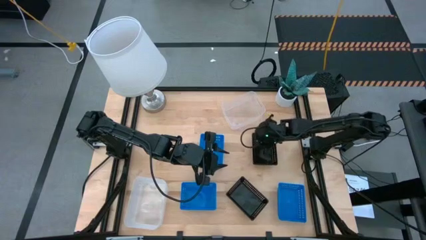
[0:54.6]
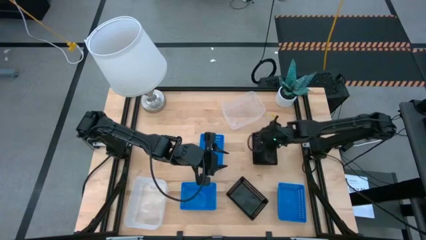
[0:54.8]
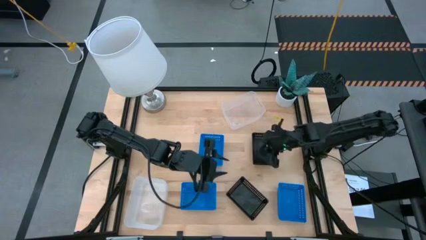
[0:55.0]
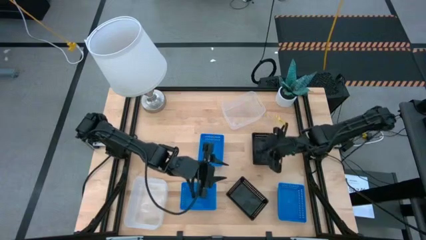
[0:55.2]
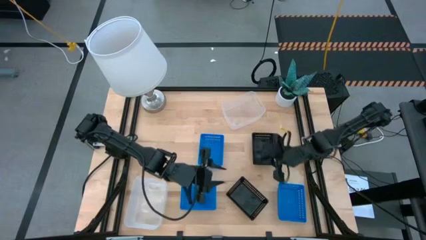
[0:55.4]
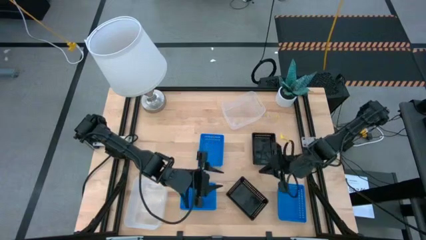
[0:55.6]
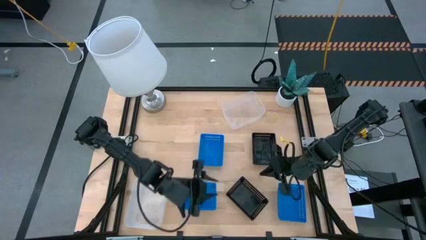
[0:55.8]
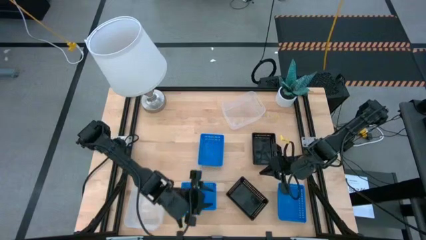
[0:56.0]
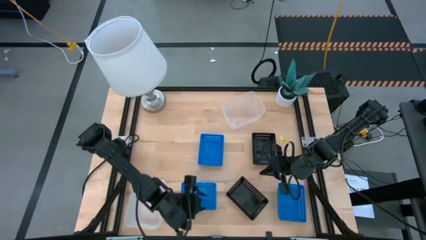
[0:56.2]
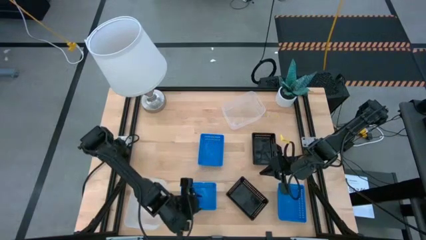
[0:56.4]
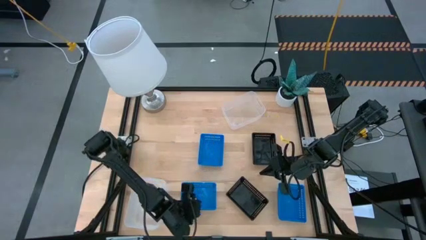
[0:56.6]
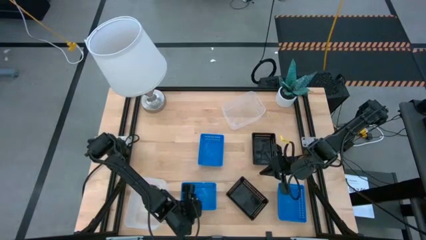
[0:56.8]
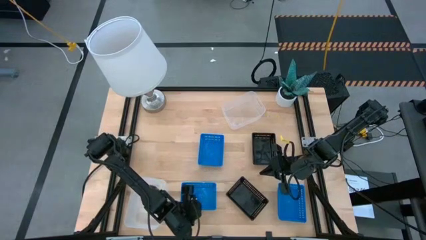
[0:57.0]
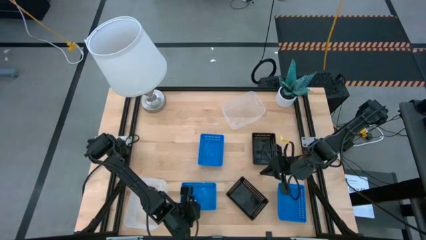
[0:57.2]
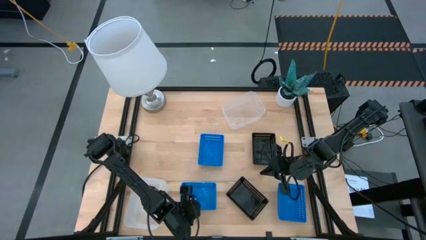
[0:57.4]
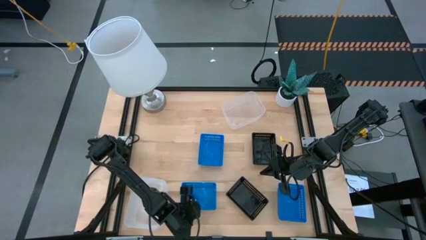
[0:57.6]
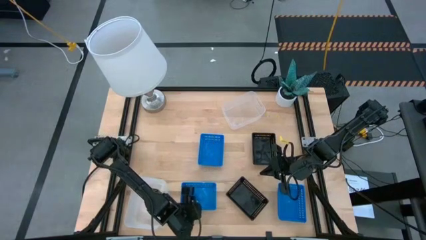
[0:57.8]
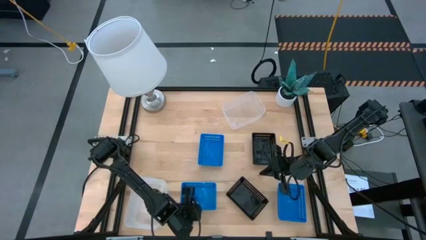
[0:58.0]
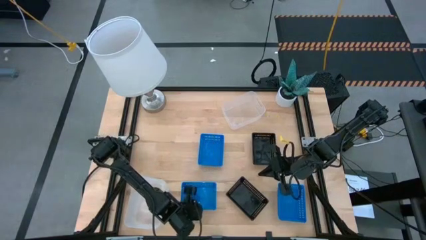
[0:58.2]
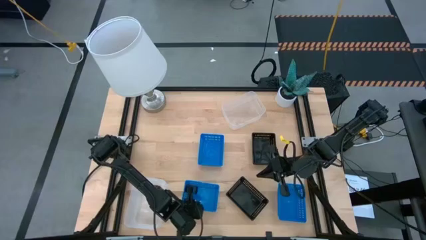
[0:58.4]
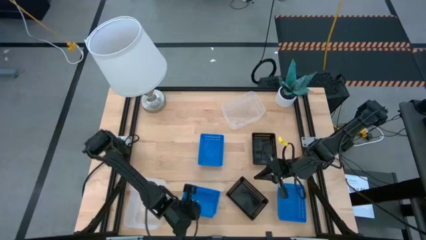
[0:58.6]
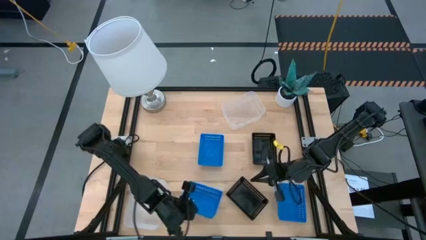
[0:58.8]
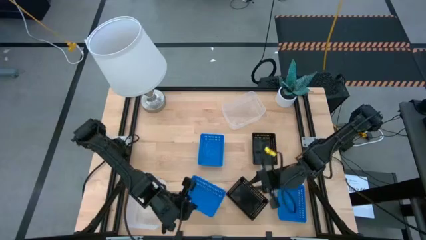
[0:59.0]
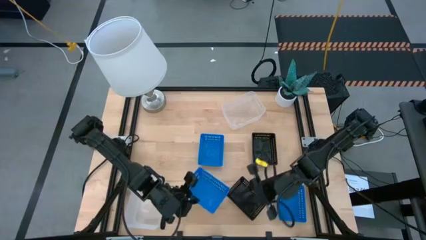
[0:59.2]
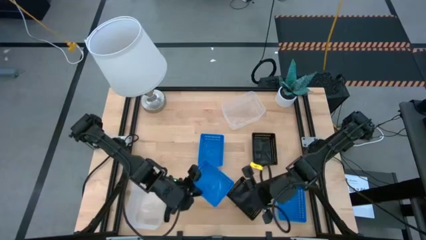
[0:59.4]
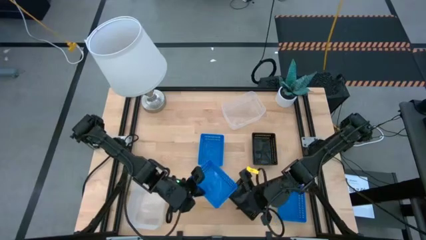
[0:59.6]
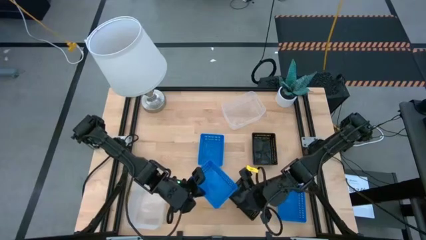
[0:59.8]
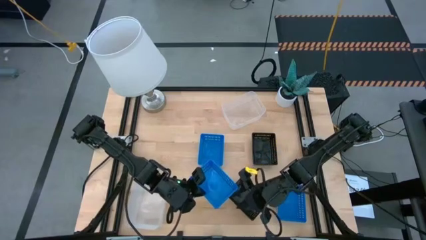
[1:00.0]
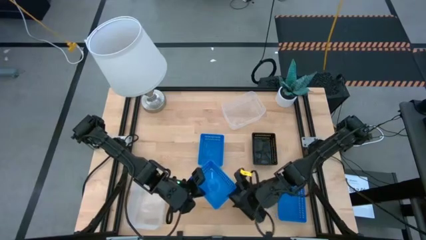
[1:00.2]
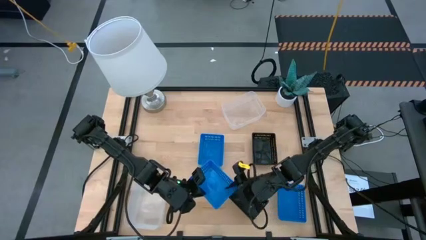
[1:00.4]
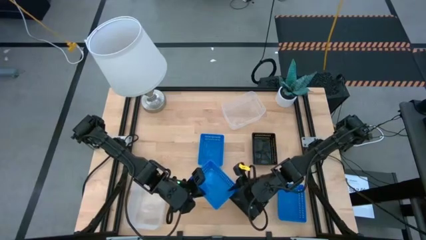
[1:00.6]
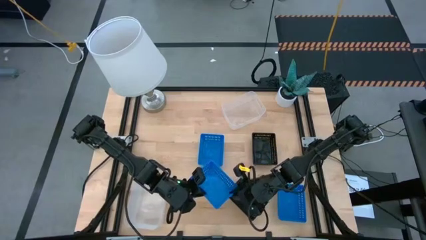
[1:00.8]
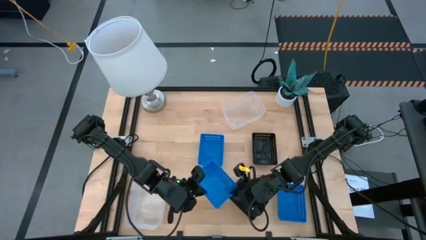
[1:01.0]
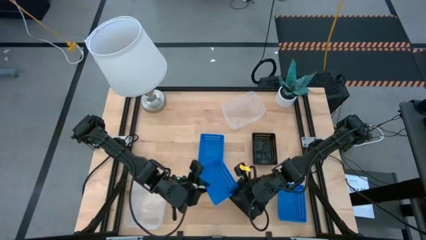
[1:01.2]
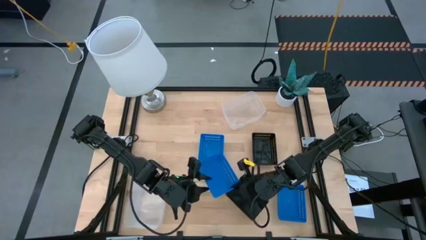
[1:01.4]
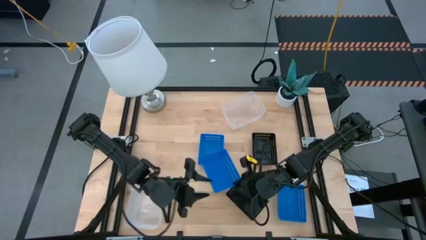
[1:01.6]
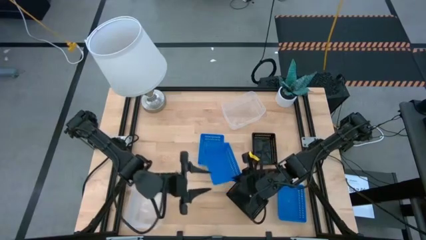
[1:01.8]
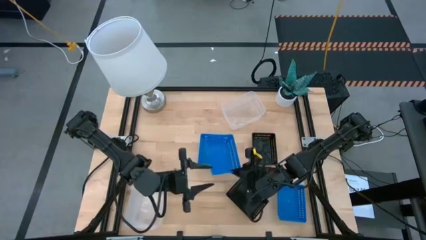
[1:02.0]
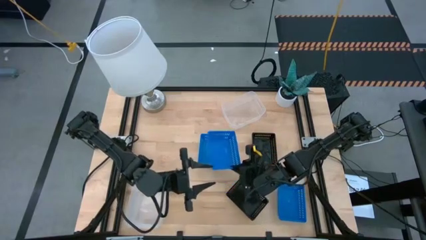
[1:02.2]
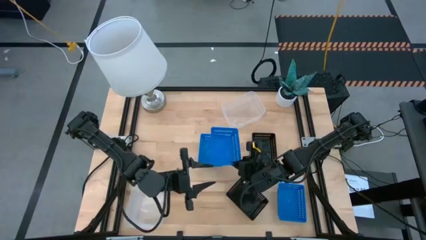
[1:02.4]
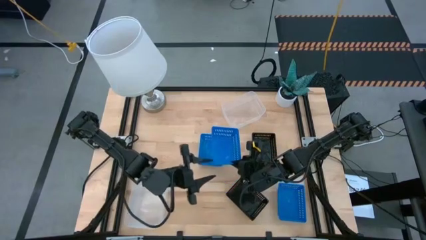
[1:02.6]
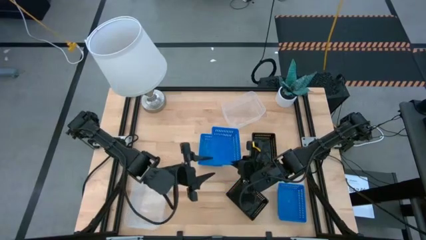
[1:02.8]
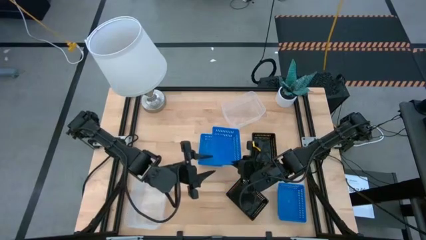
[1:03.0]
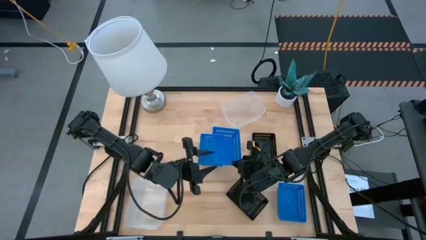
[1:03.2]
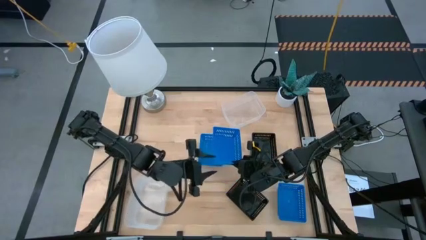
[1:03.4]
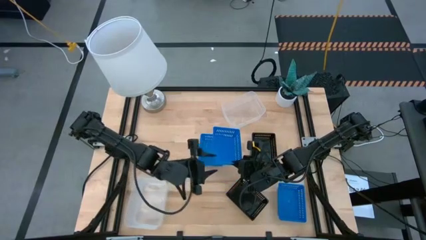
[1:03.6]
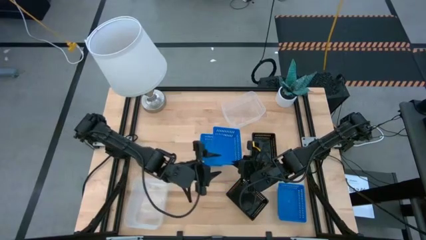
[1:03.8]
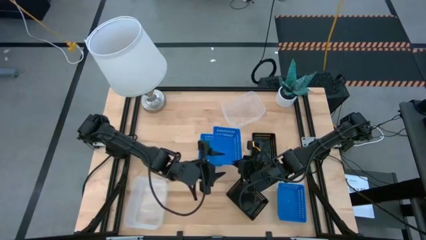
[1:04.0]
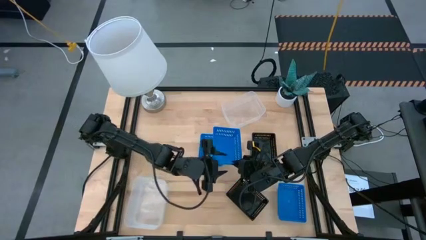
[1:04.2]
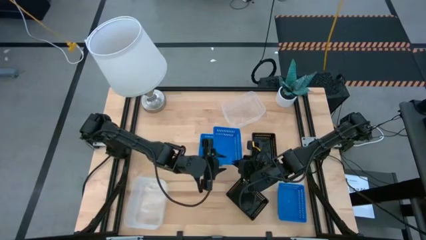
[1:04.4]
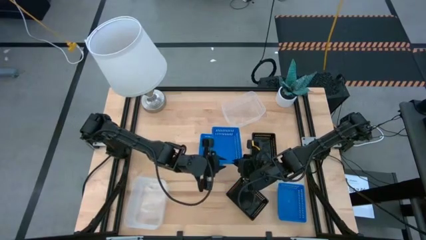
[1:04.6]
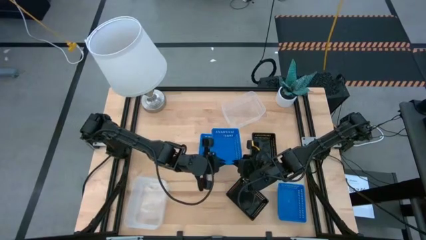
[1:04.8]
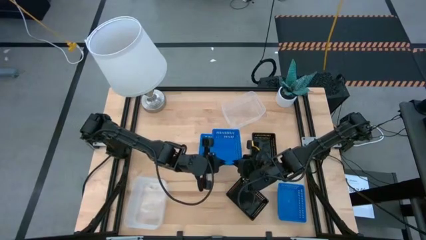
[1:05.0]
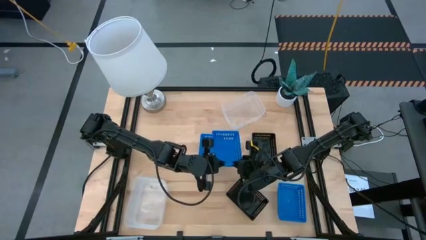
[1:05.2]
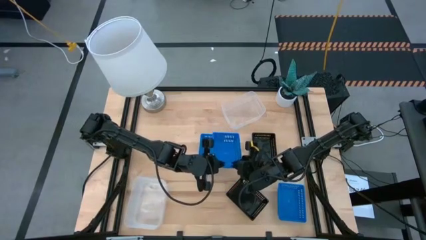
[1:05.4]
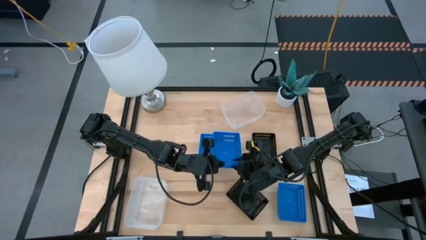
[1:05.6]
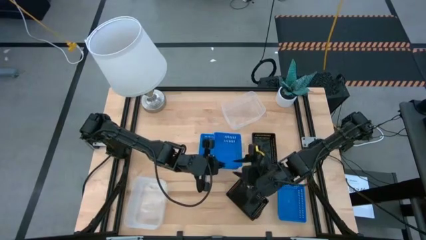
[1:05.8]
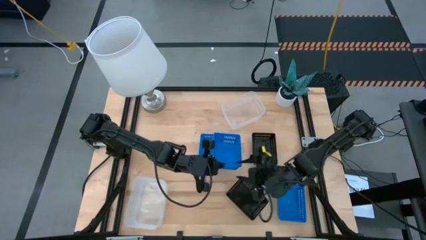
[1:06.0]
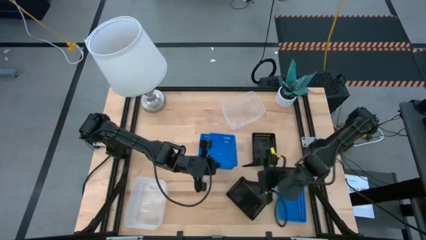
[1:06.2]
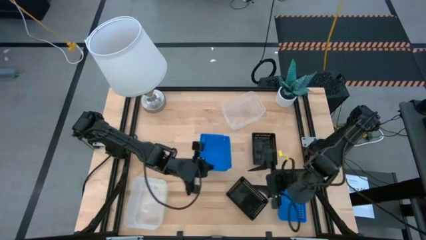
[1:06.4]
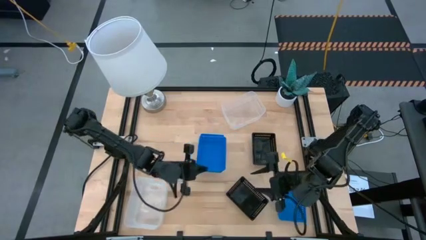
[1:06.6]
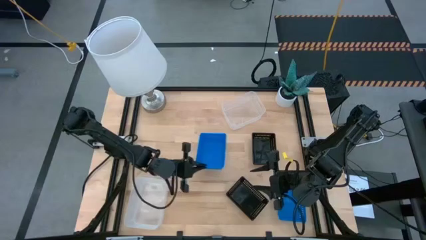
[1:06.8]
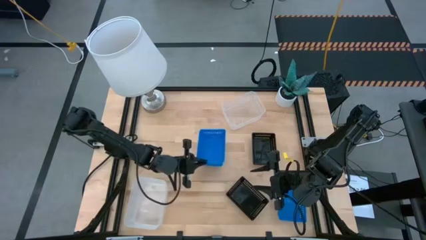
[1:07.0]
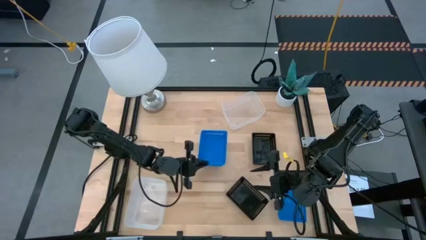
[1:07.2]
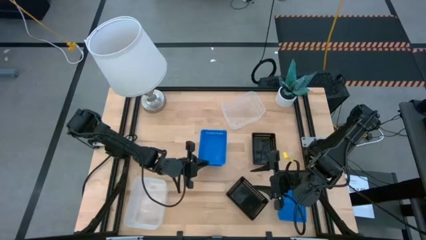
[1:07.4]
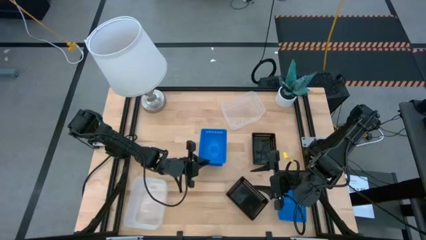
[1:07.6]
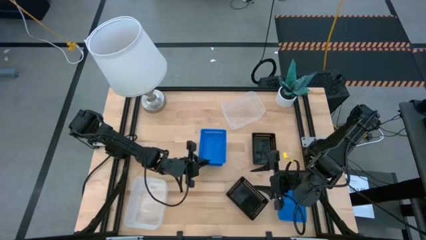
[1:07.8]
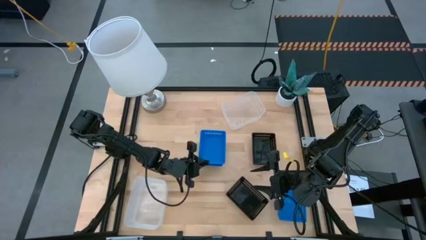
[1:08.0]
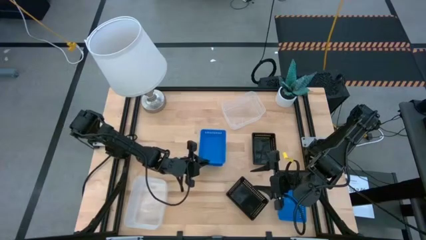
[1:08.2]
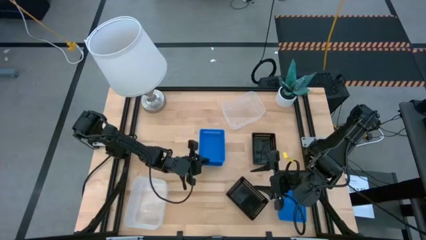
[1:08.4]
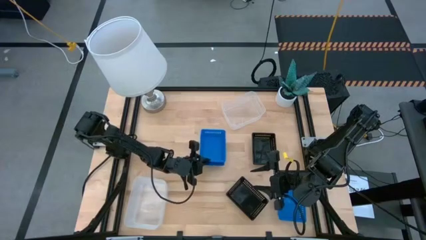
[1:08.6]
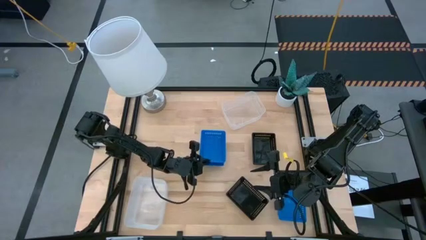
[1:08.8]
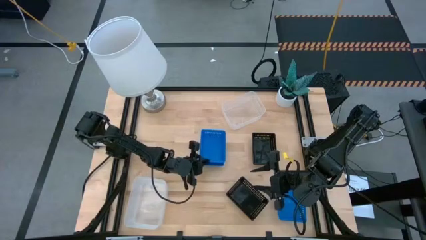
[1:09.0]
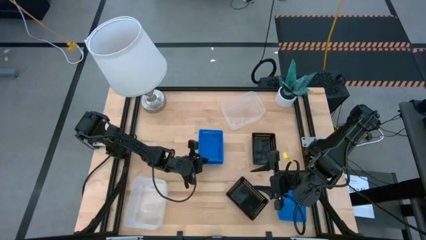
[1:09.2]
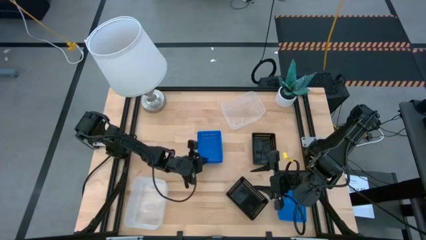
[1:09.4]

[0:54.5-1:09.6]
Stack the bottom left blue bin on the top left blue bin
